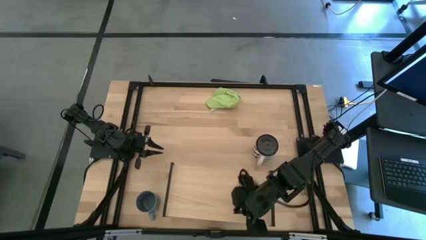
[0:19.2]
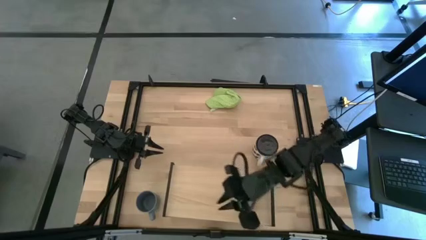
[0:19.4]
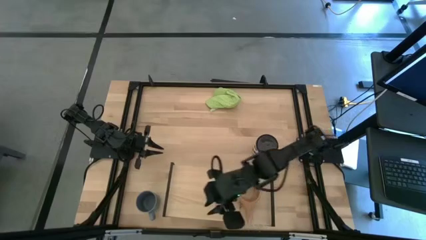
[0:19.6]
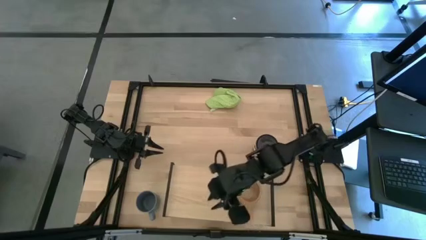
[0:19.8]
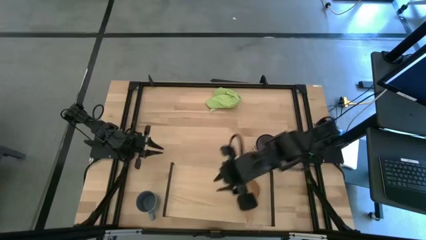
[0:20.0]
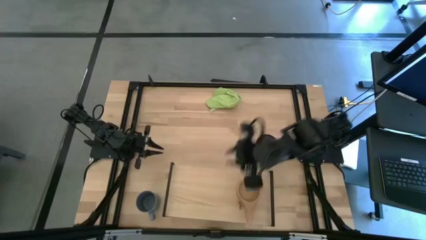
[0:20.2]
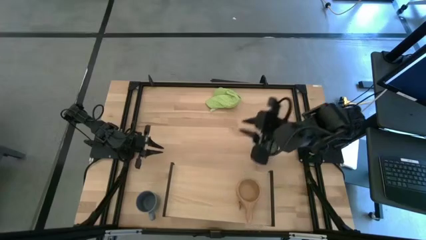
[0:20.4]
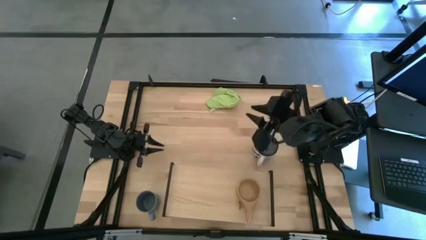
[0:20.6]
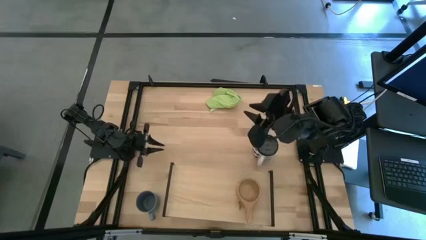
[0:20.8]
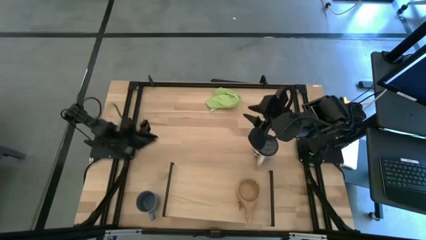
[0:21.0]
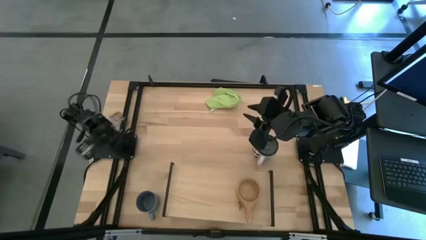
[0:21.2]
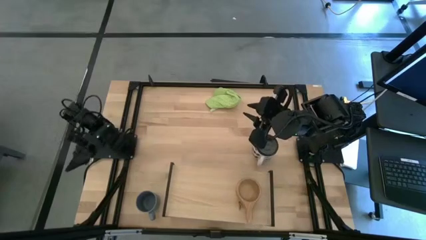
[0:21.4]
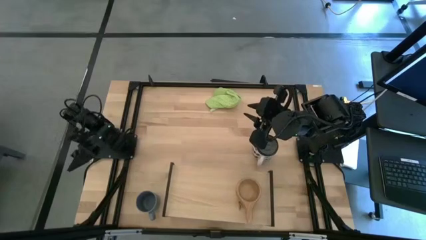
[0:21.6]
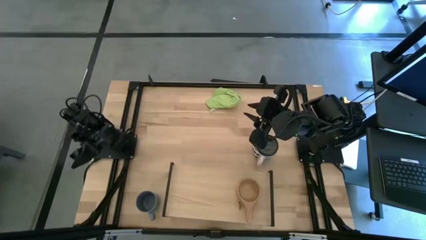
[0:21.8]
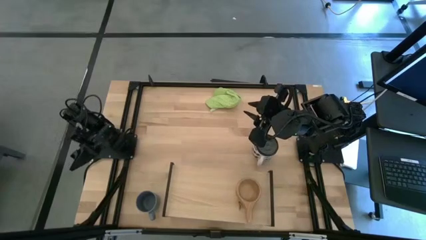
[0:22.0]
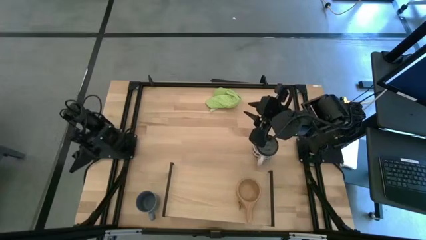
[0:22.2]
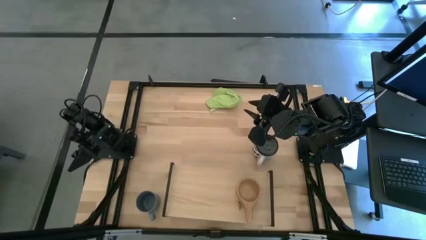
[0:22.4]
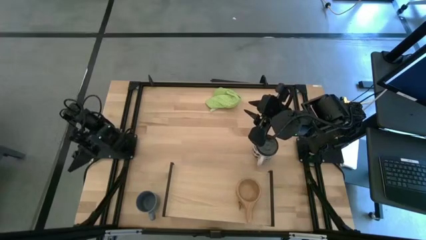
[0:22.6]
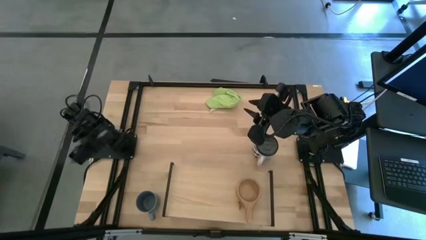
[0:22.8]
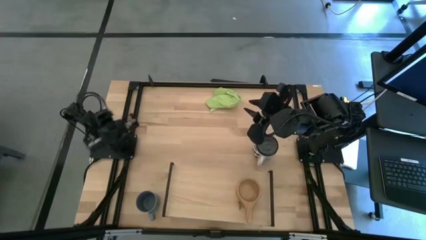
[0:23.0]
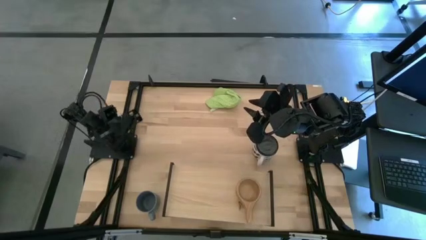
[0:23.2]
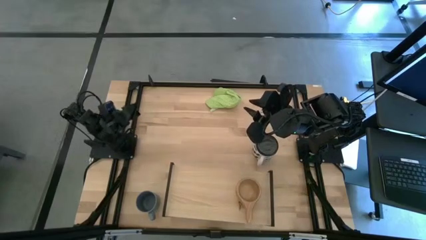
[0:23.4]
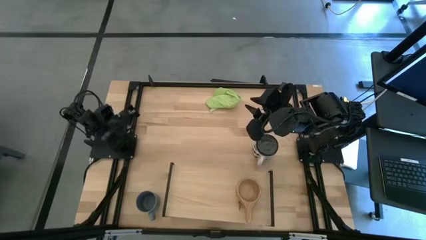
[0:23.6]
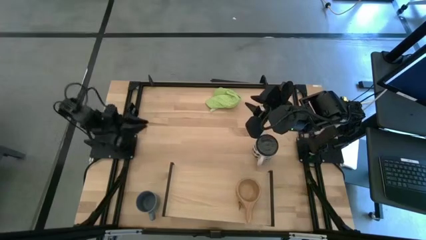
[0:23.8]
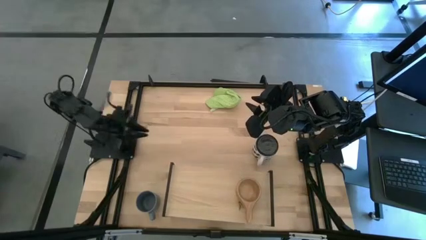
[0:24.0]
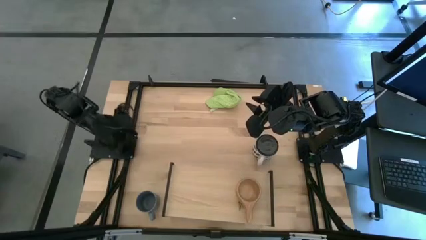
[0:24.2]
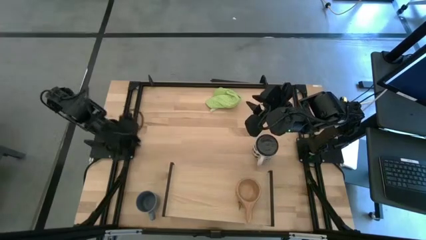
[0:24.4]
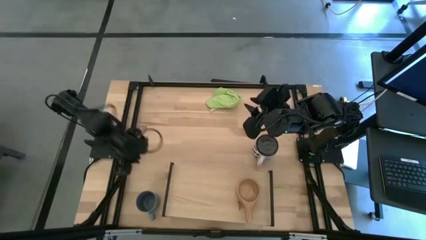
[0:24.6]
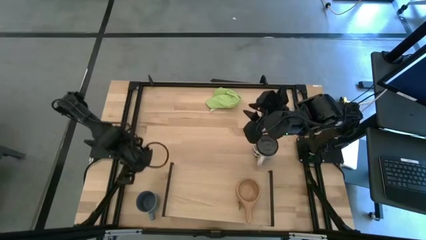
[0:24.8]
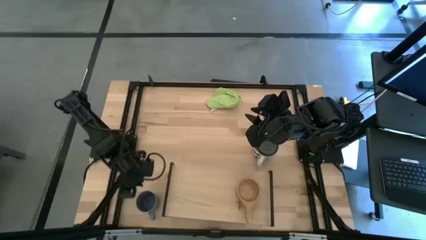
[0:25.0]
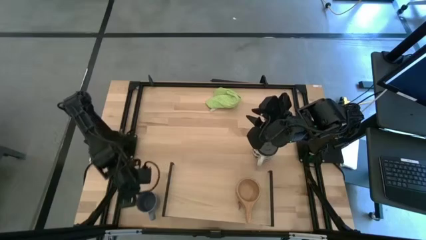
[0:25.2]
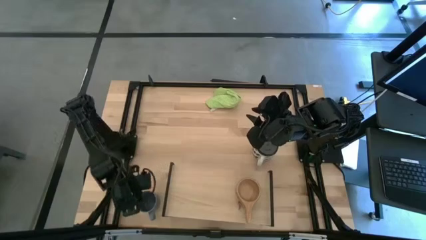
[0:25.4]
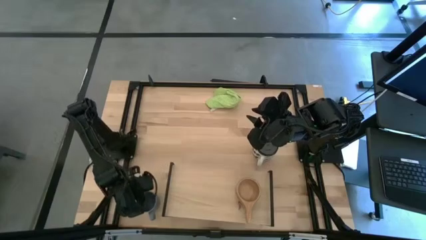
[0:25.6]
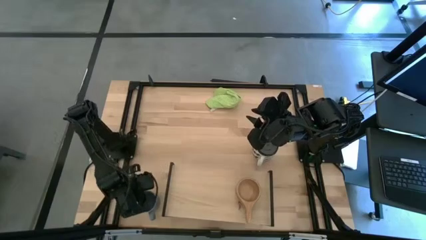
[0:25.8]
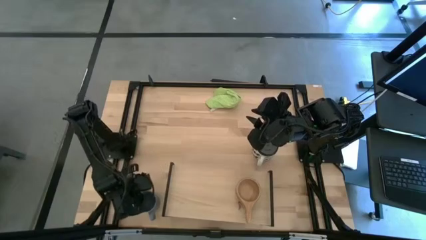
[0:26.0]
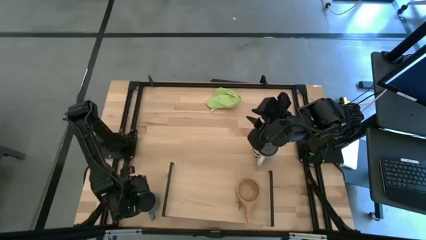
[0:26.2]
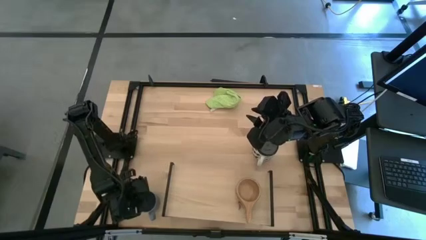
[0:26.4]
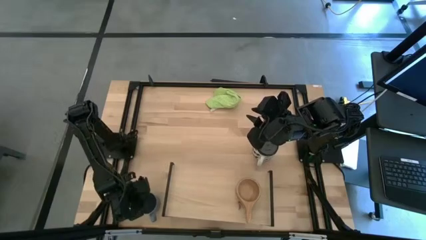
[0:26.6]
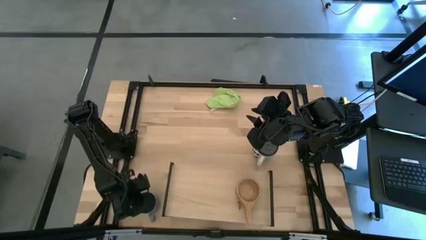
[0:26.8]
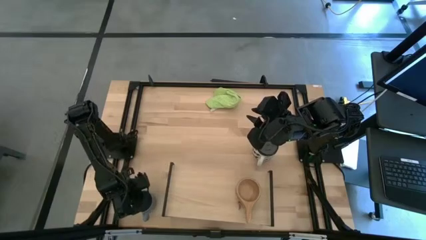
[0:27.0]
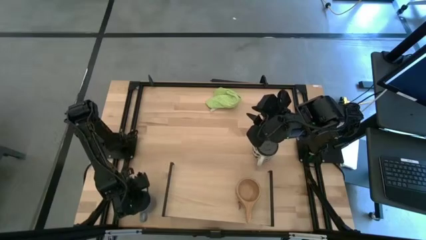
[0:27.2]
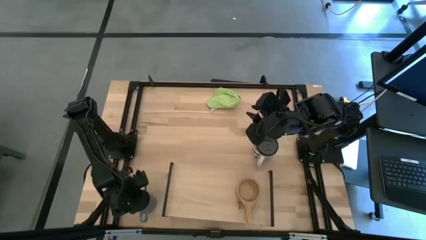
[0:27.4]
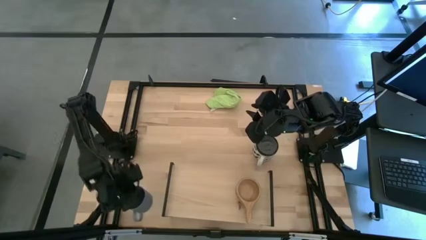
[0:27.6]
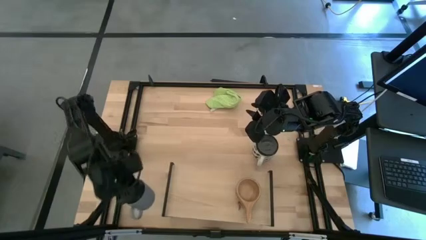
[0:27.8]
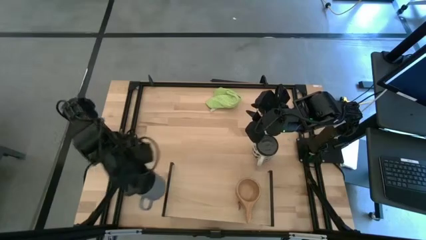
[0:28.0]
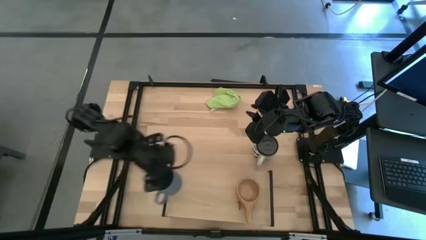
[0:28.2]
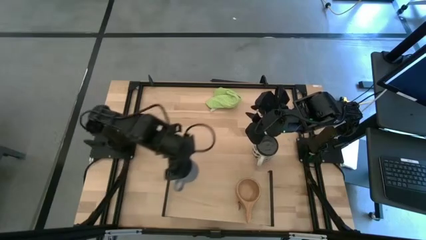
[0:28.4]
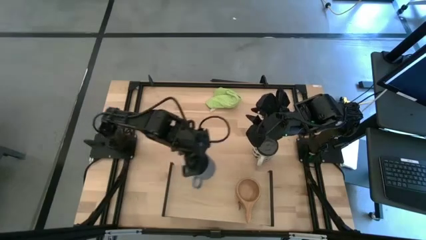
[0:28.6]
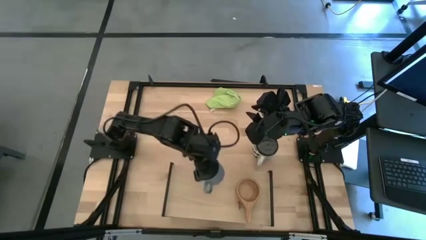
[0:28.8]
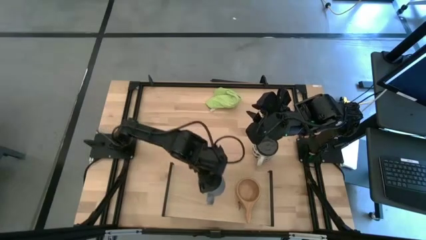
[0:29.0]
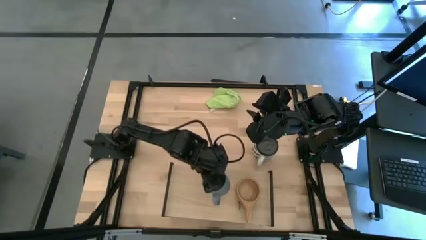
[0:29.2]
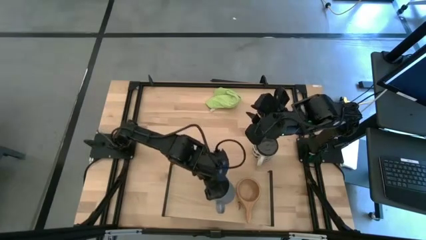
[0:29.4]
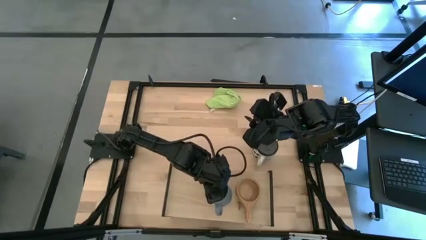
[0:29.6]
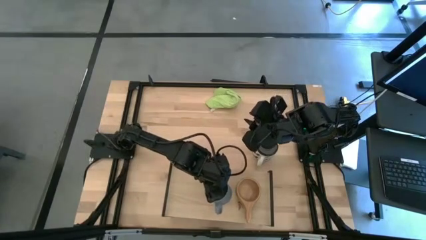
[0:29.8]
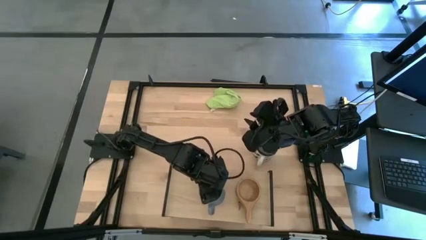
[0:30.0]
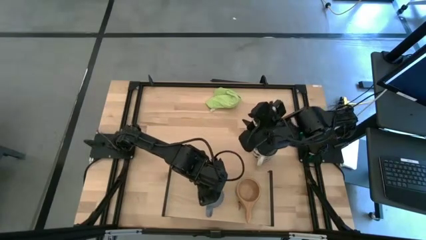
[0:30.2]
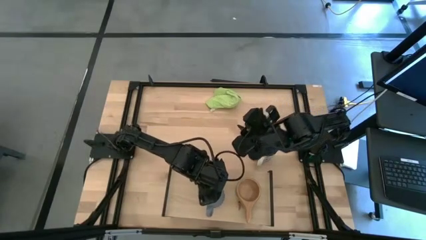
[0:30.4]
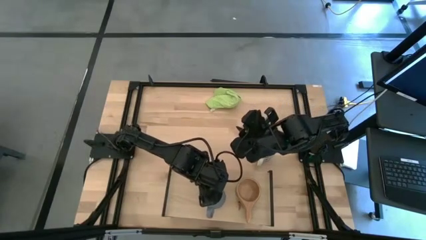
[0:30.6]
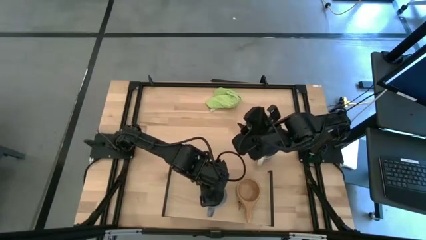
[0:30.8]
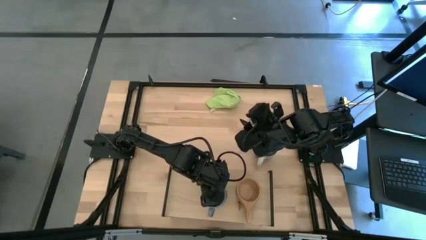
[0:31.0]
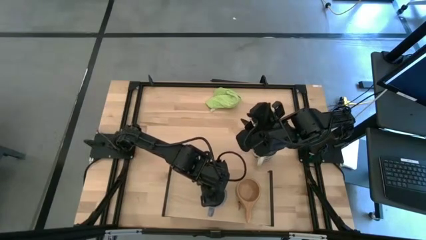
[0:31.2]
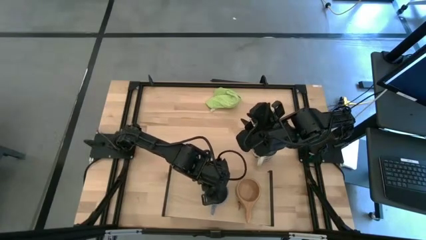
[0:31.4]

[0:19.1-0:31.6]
Task: Stack small to large cups/mugs on shelf
Put the blue mug on the shelf
